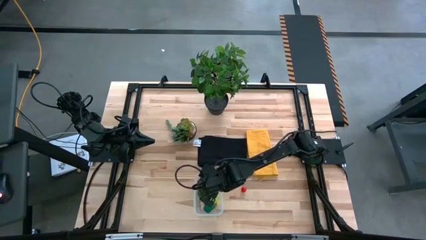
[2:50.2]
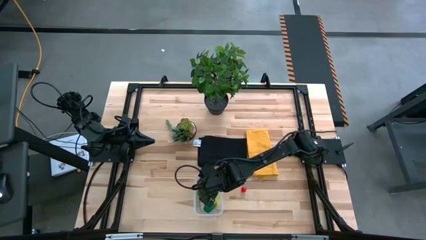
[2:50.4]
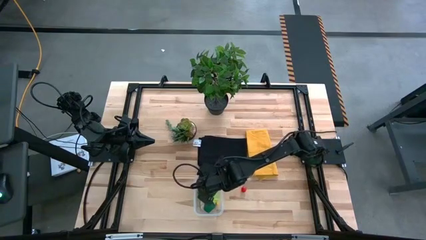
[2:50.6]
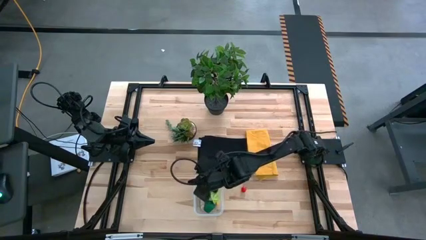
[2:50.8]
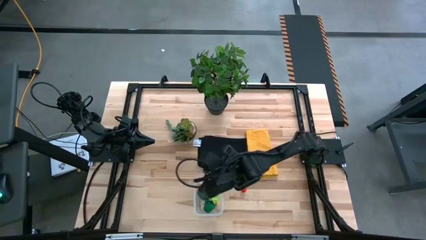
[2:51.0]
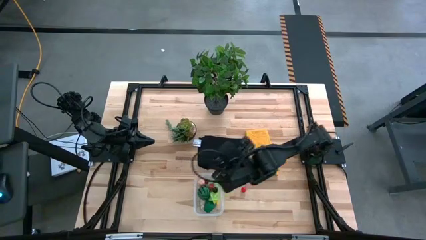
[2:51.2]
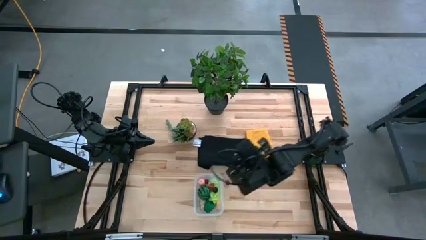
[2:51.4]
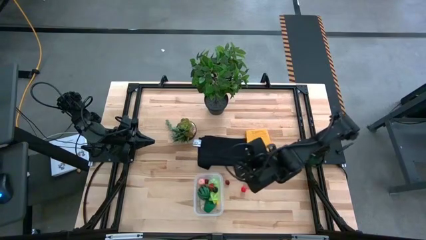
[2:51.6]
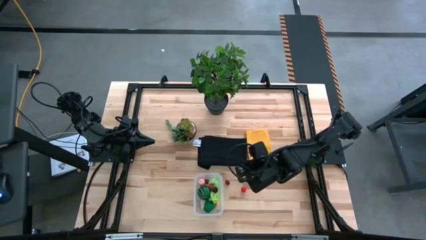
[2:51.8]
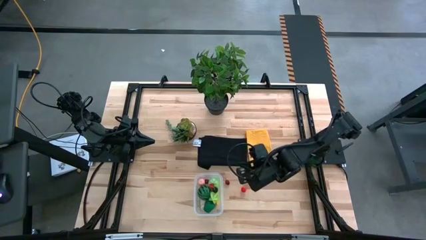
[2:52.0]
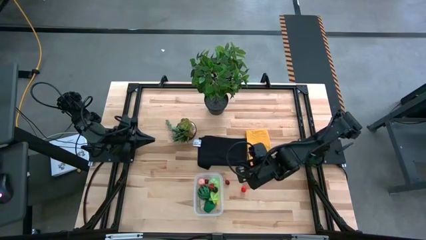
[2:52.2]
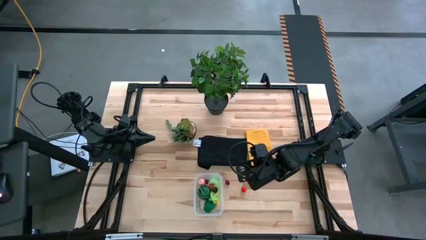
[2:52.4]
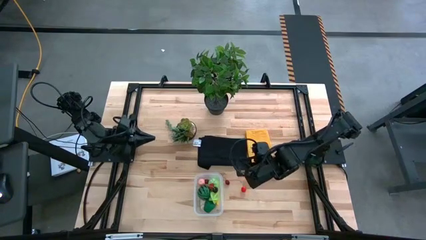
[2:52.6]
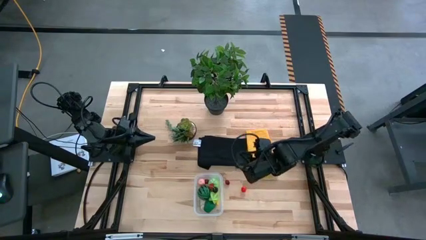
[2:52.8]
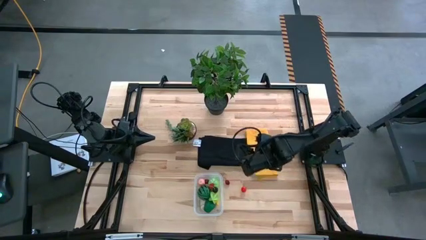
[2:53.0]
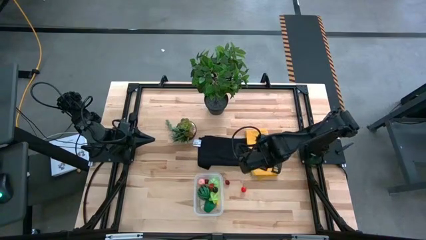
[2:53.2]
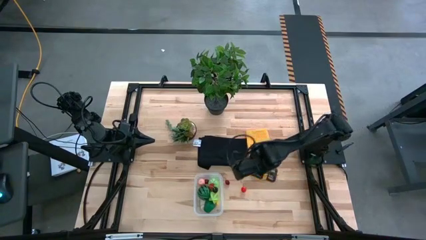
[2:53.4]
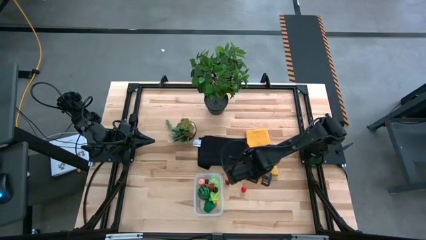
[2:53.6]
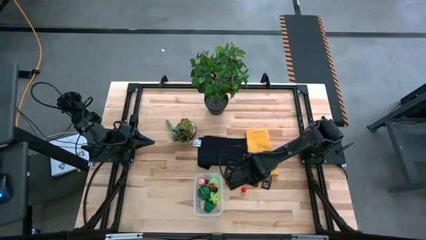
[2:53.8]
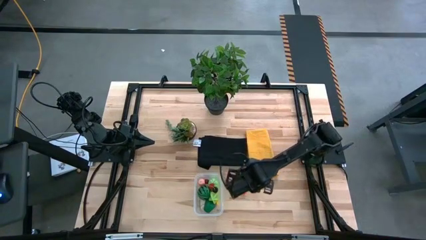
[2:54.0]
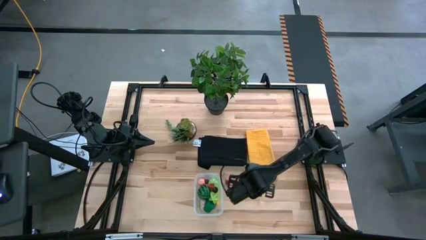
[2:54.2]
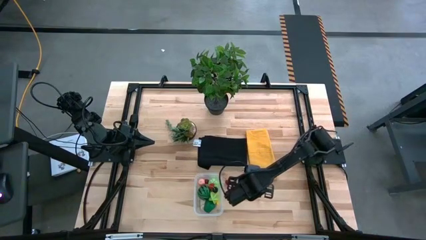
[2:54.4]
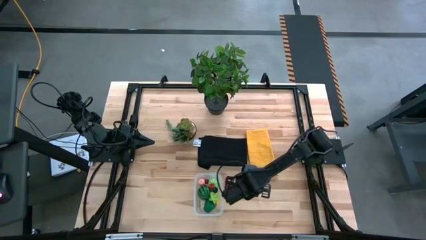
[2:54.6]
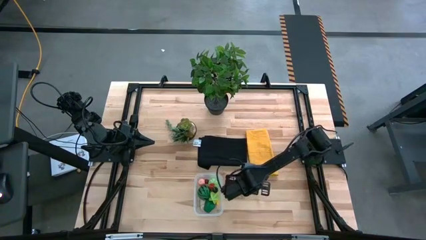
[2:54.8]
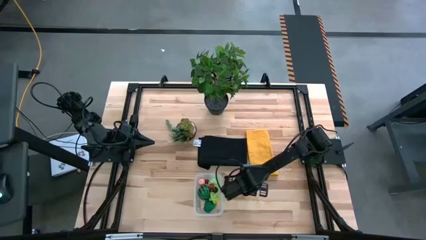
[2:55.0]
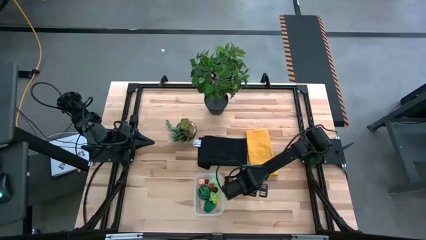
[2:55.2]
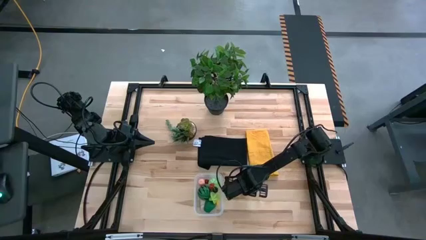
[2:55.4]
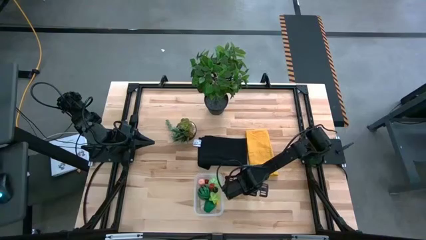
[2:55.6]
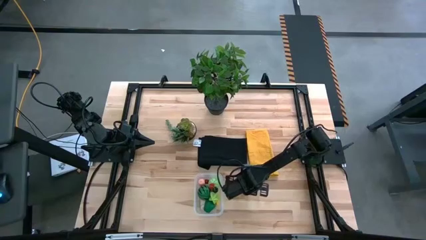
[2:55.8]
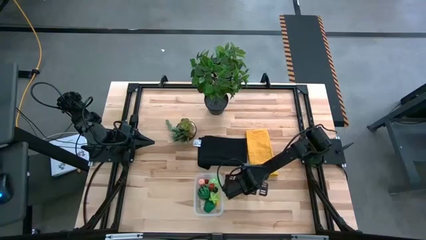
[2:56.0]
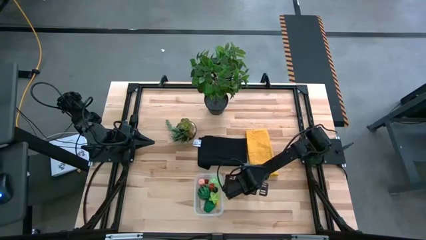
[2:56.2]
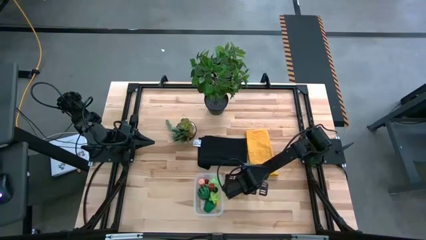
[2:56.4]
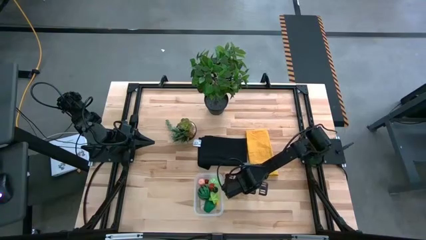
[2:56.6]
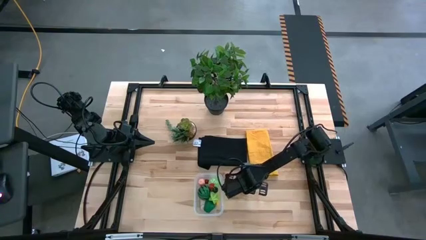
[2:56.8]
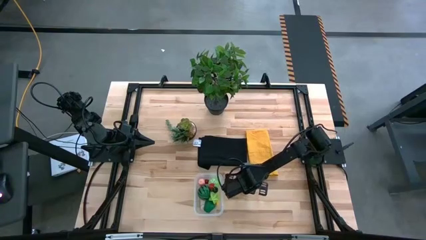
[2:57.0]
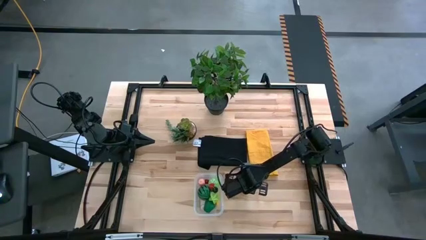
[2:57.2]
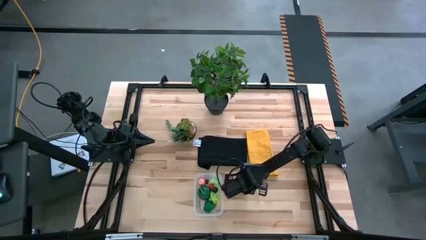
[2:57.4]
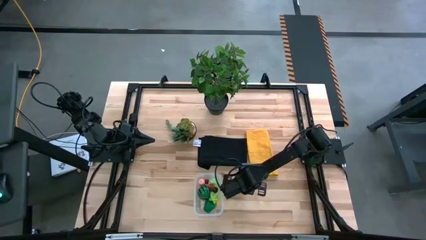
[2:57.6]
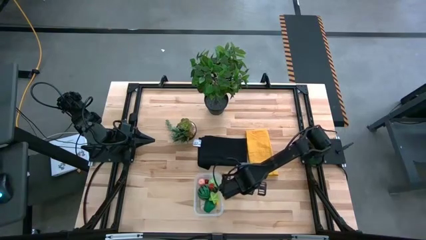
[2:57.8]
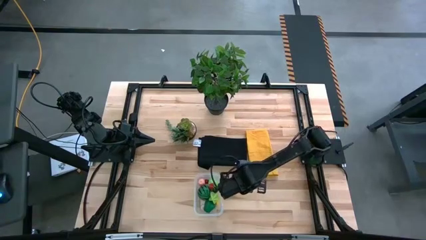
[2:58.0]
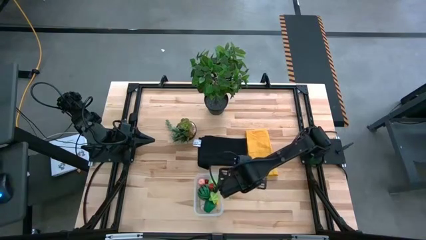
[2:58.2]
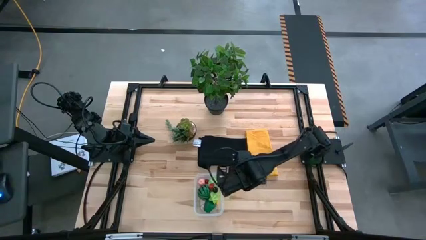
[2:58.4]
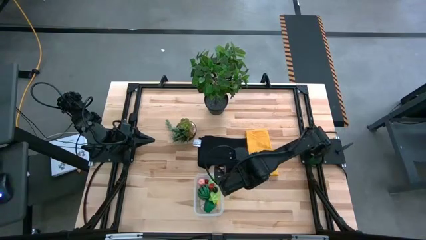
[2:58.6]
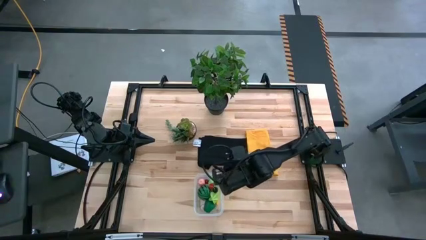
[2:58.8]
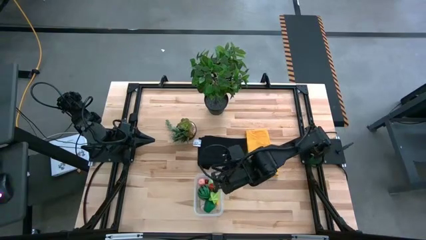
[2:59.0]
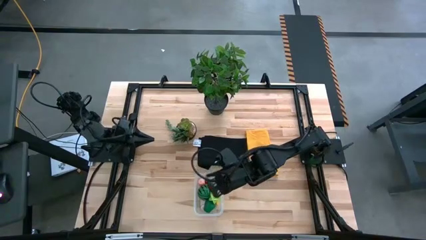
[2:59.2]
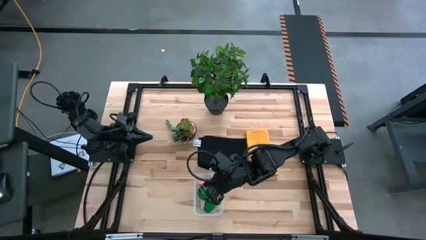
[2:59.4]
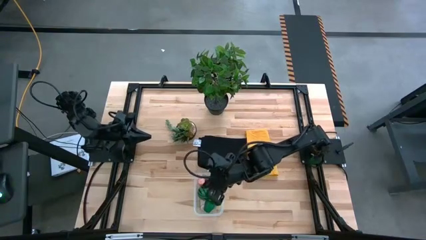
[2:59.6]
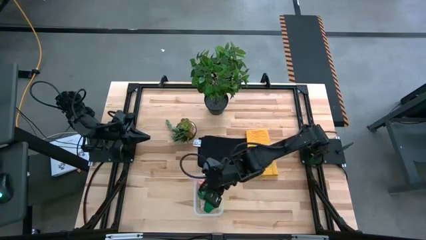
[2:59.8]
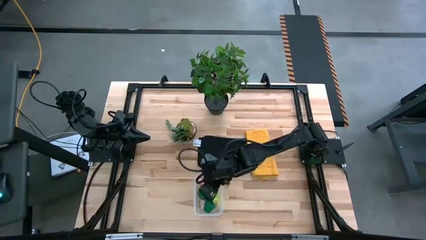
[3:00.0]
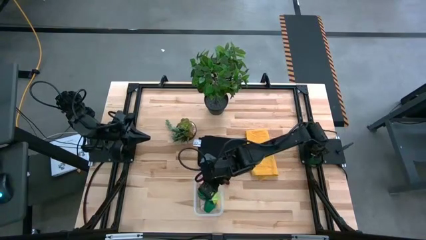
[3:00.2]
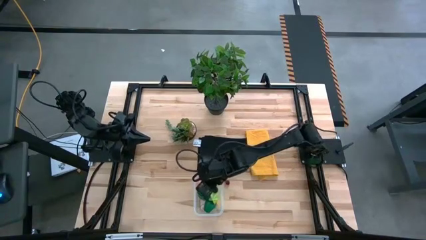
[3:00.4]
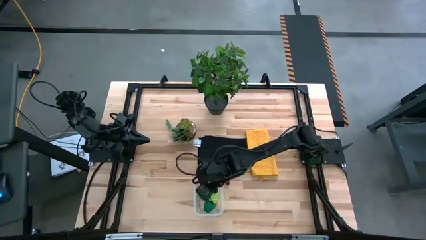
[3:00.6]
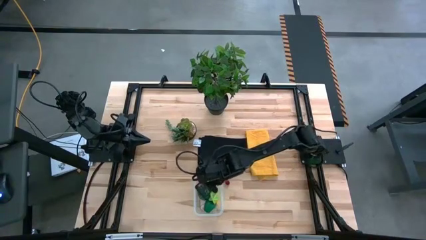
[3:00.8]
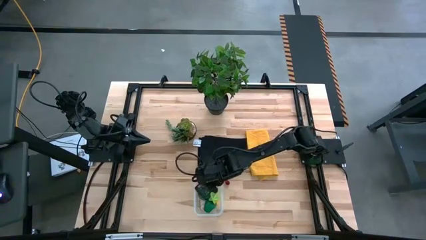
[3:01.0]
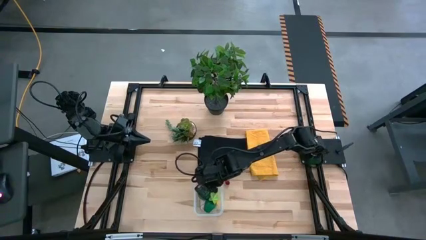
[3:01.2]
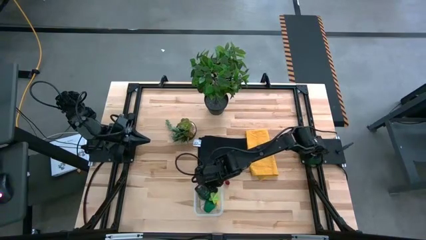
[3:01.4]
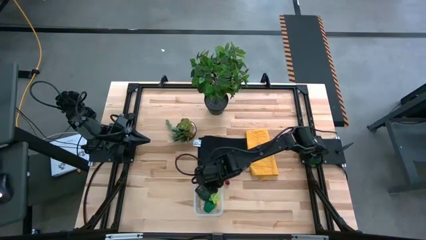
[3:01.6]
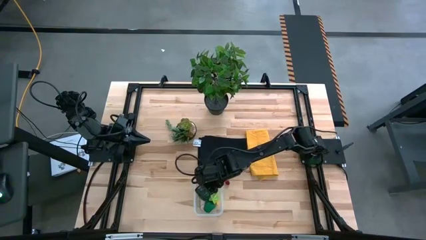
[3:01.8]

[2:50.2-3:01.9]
Task: Pick and placing Produce into tupperware
Put the right red cherry into the bin
